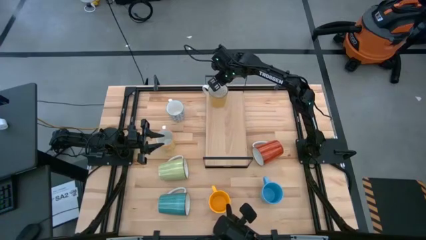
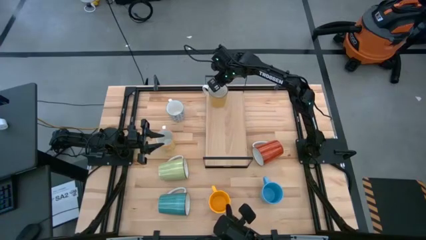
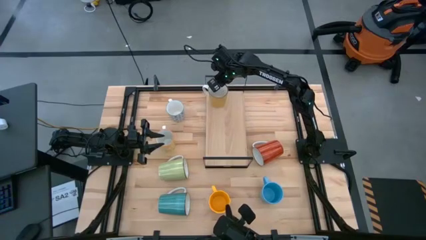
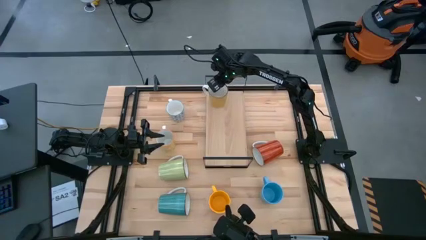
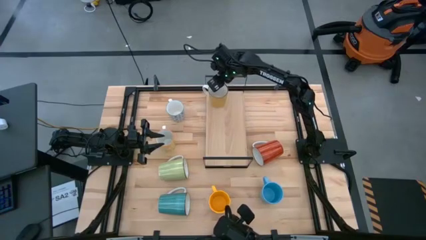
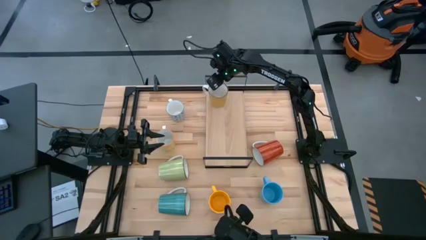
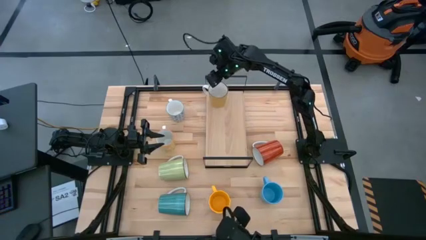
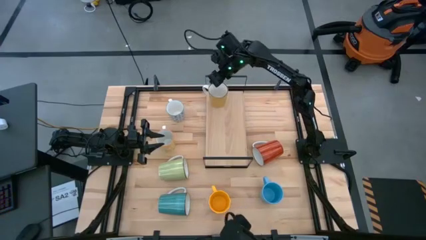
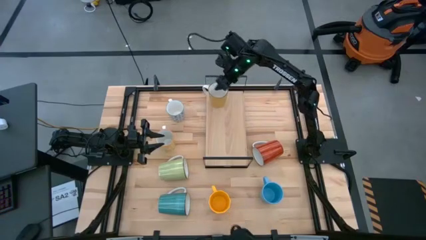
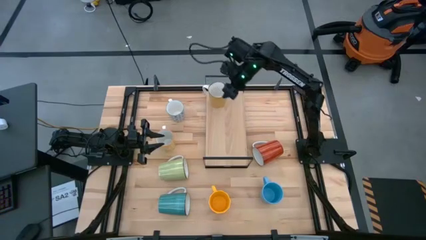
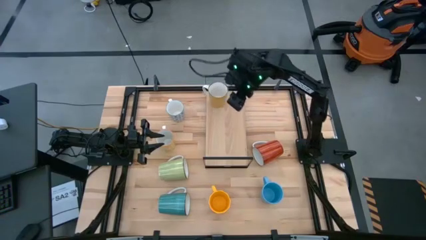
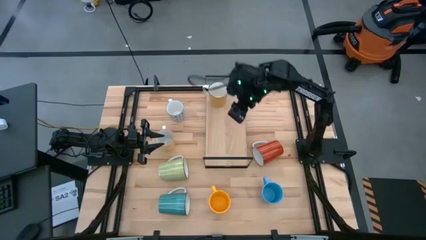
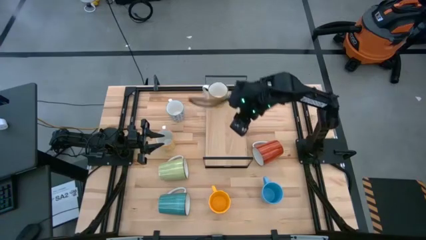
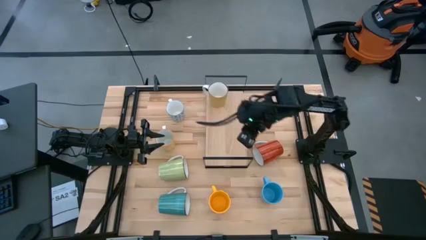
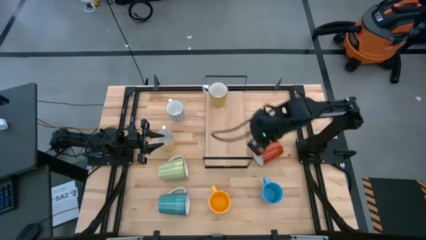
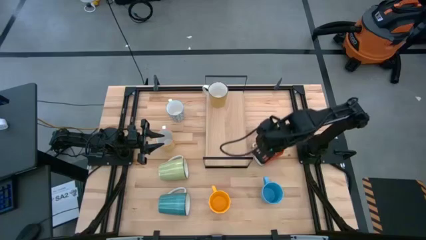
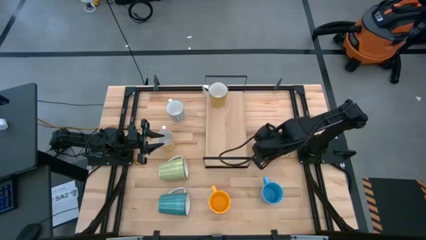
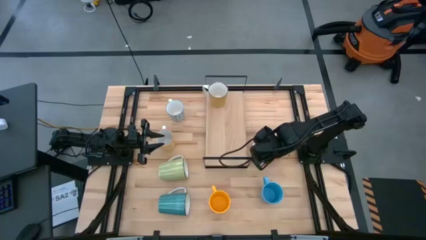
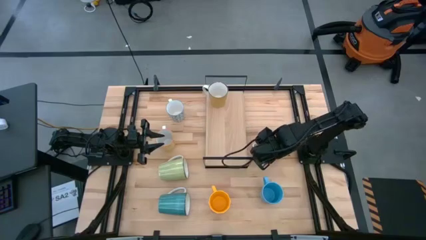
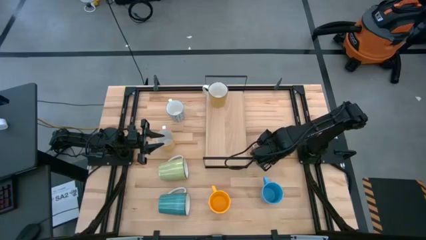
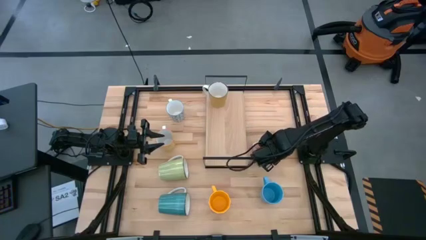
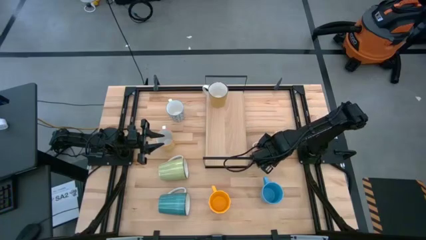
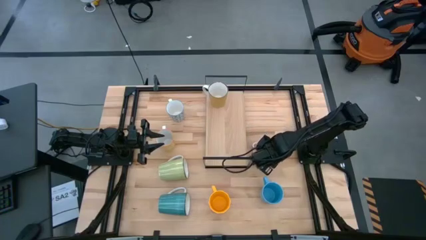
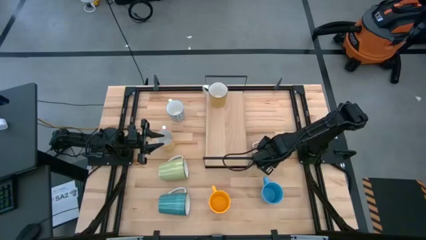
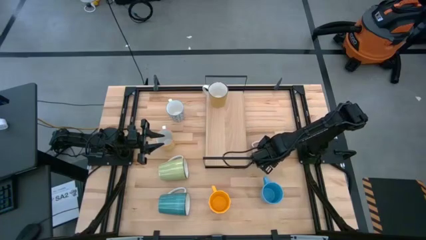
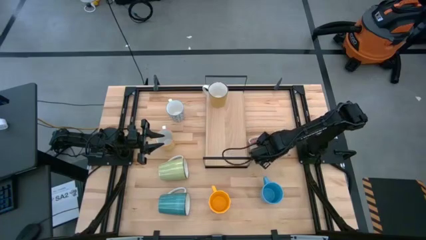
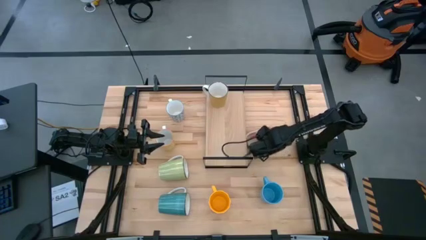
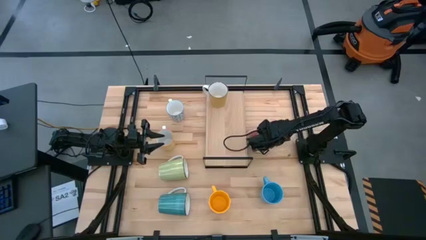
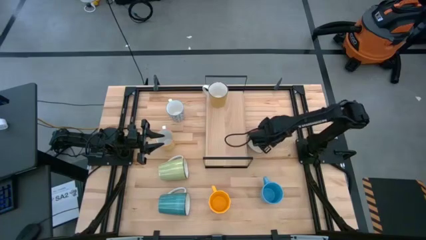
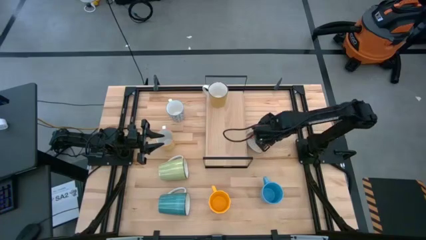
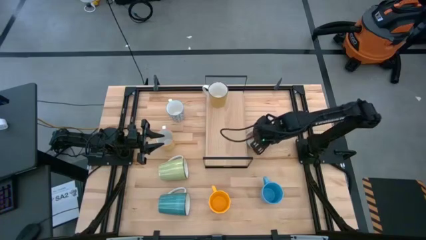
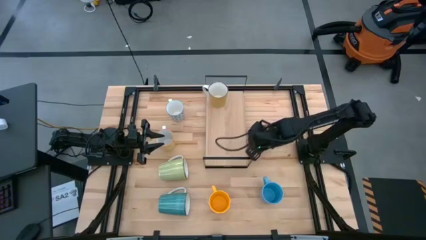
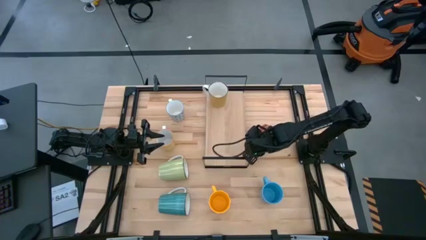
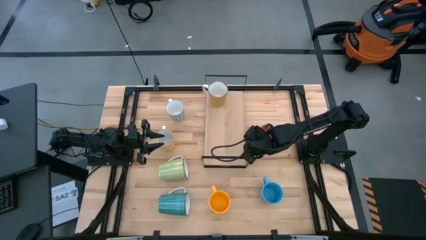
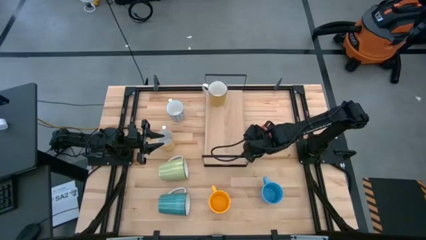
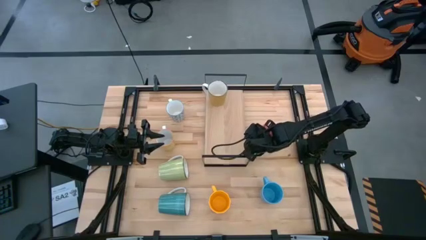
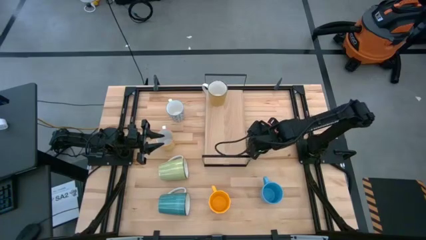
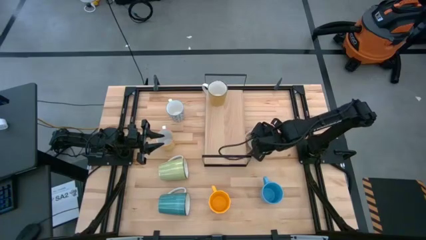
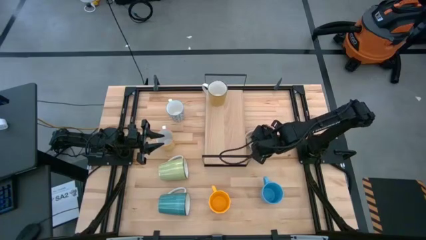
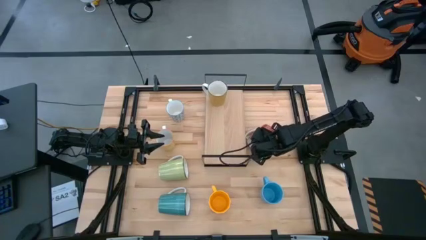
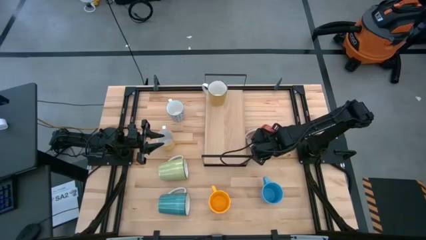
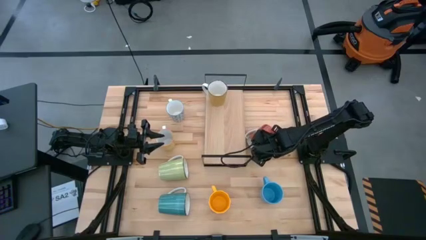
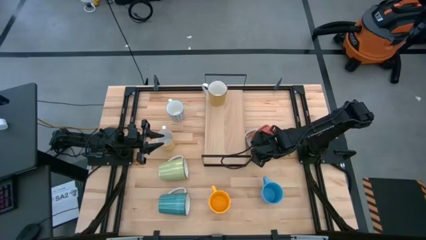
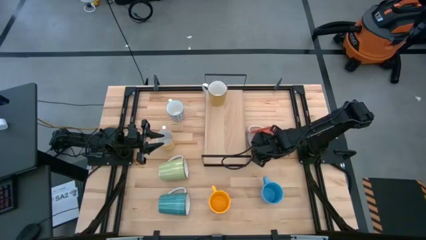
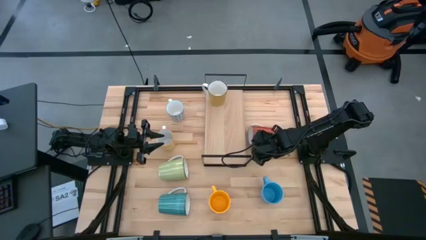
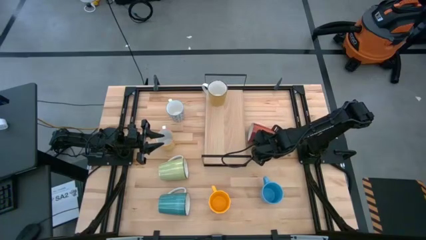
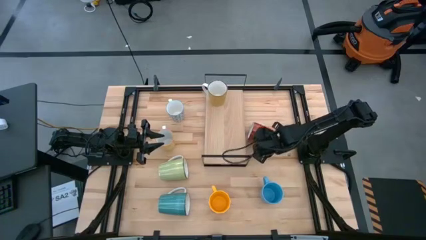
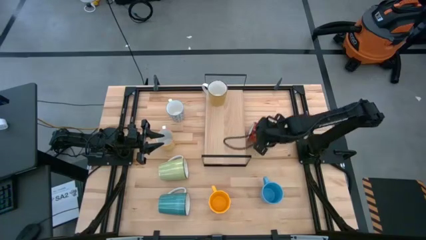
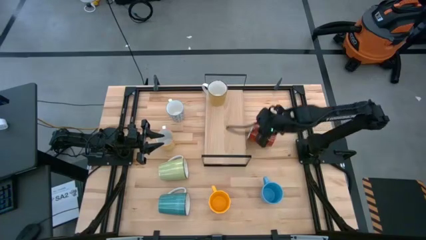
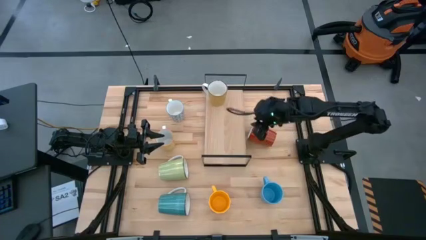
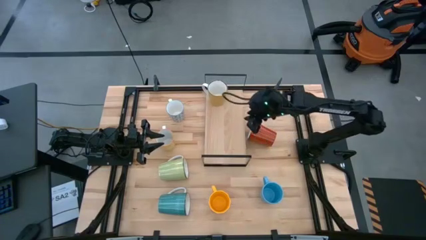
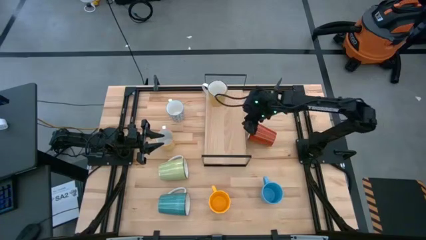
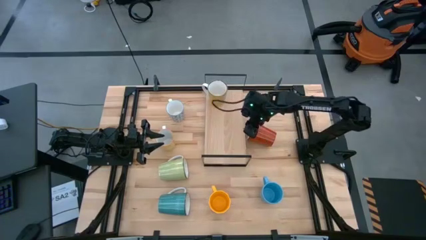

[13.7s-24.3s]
Task: Place coffee mugs
Put the orange mug on the shelf
